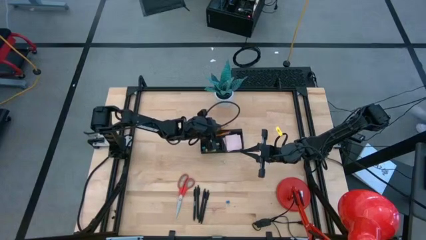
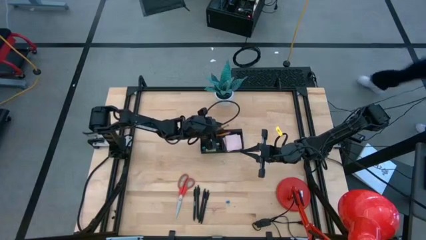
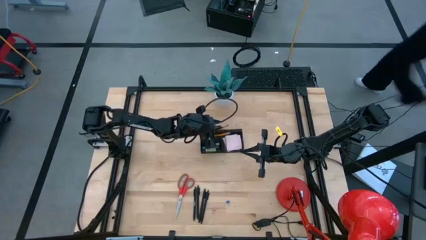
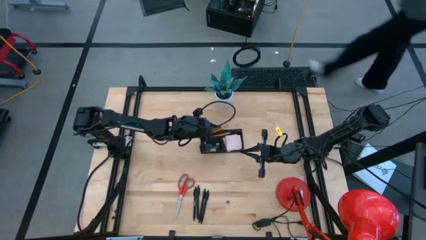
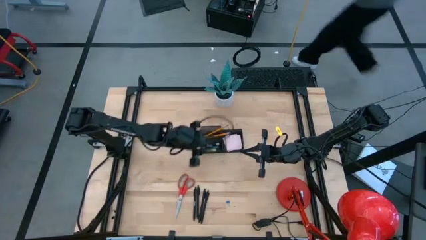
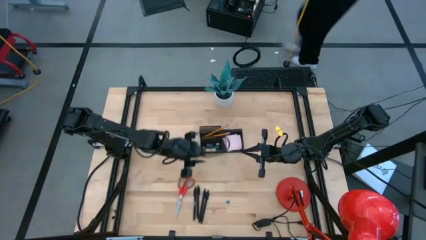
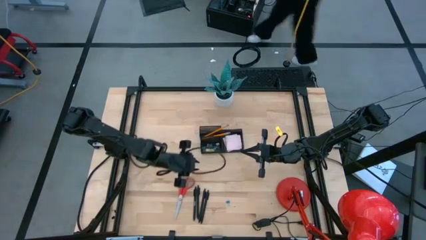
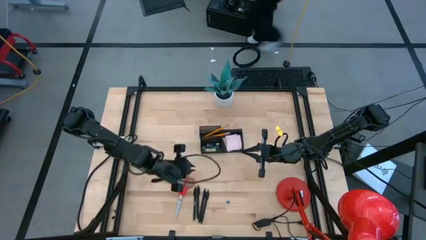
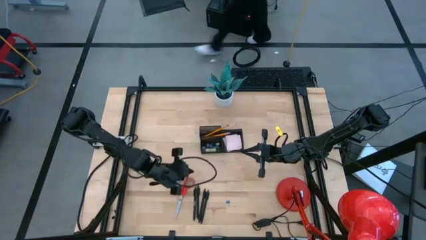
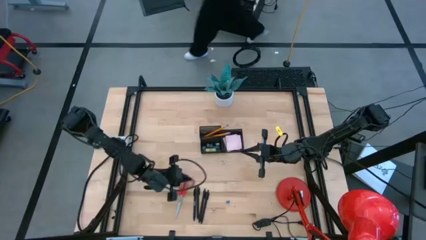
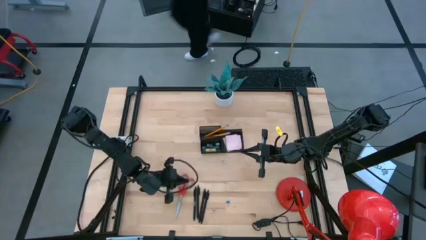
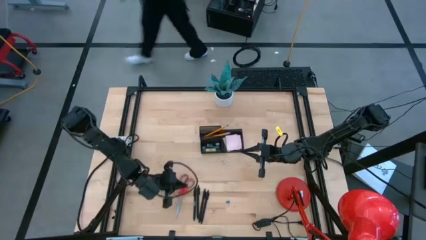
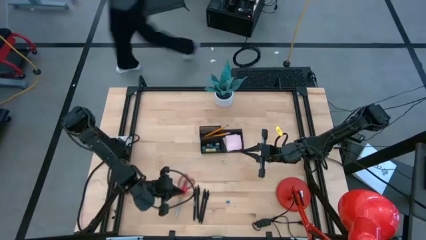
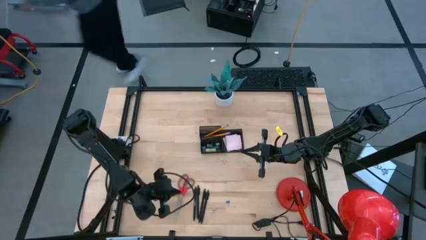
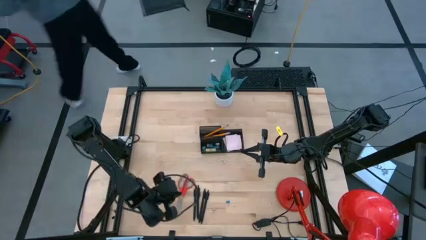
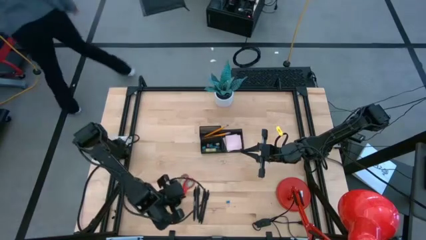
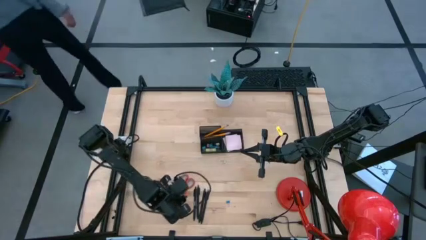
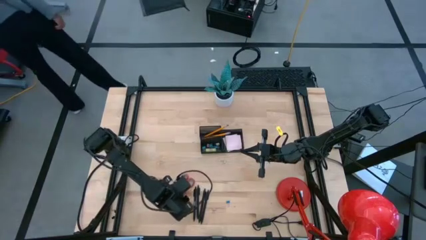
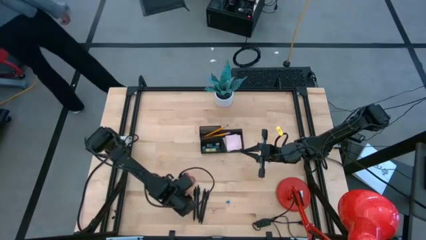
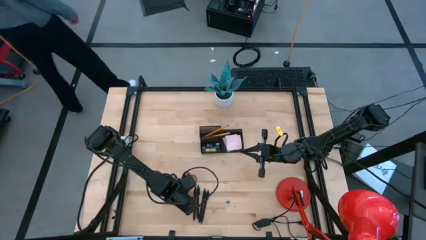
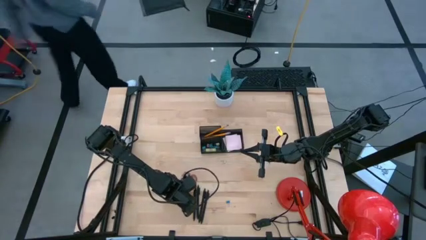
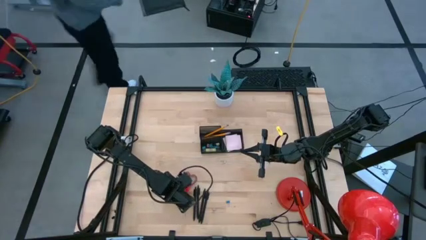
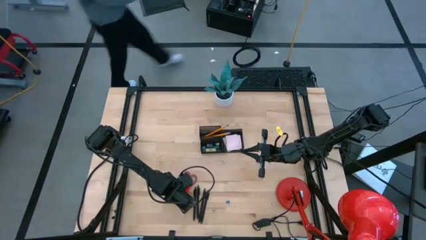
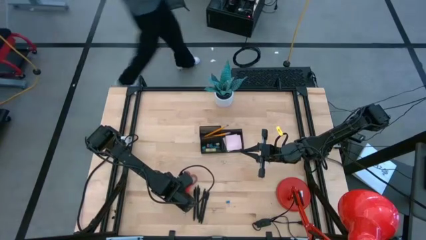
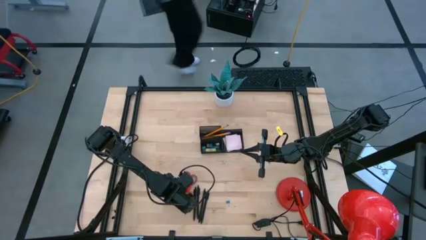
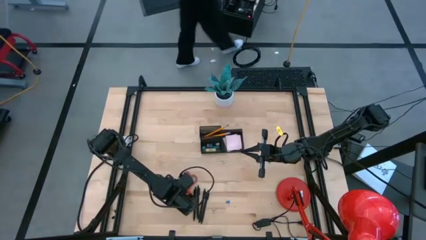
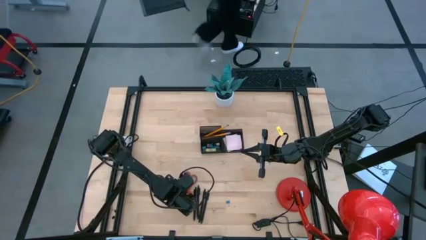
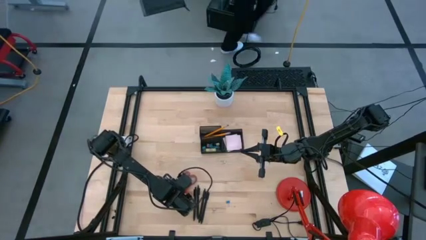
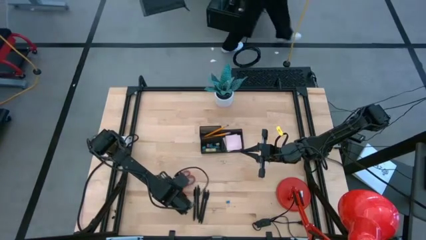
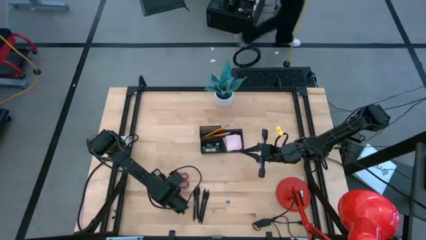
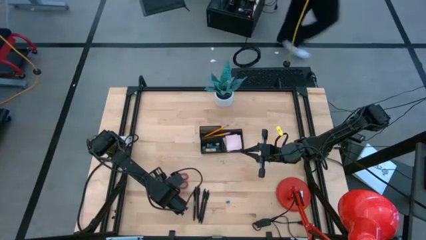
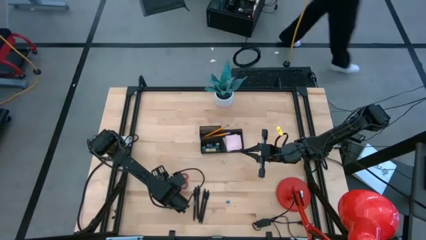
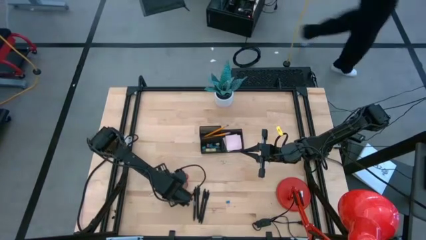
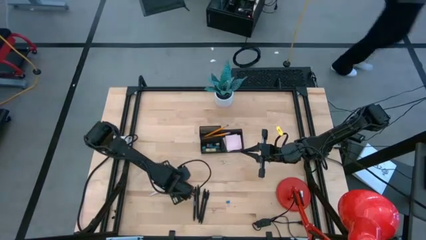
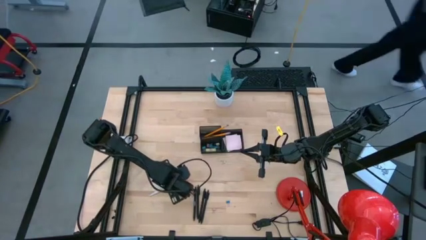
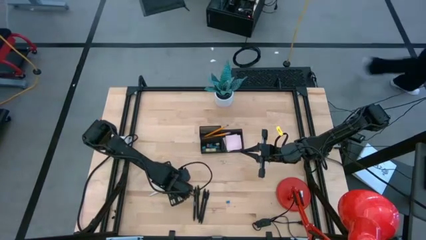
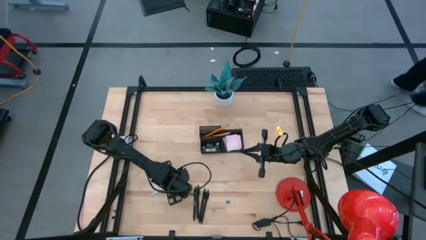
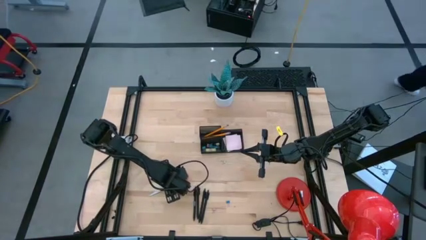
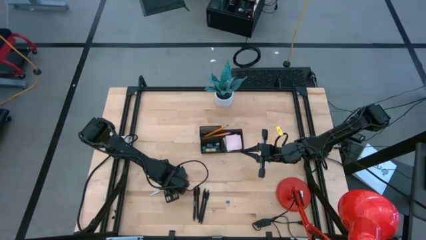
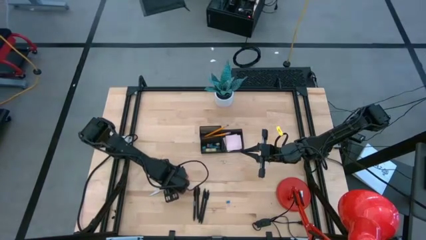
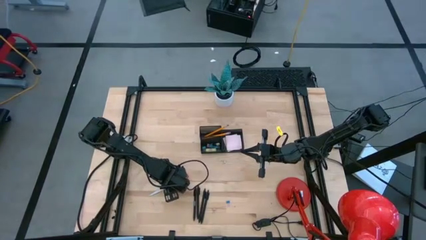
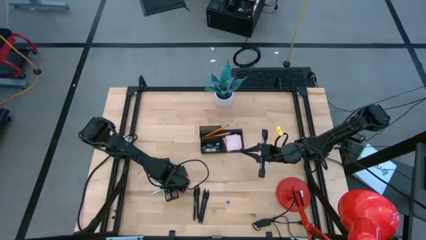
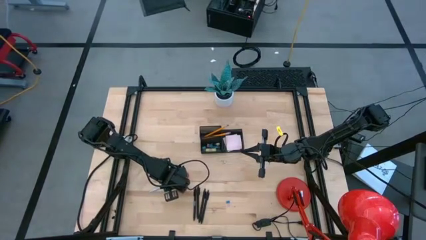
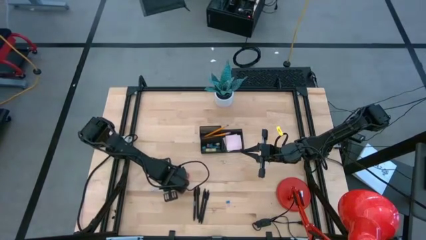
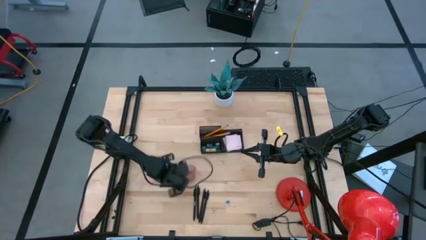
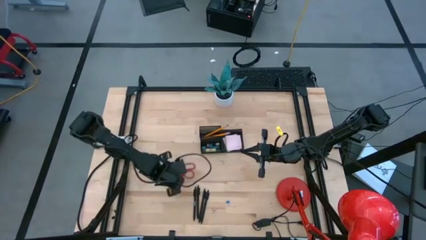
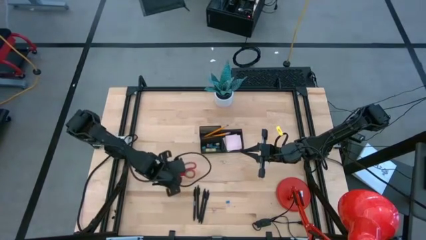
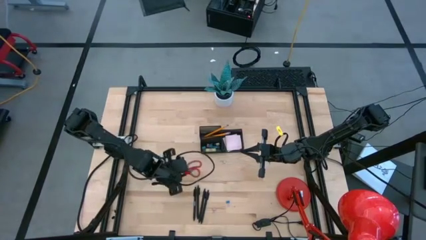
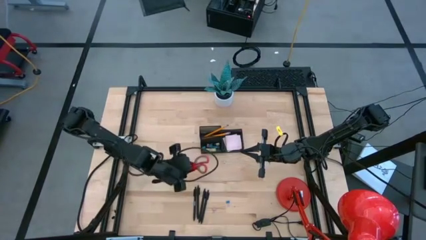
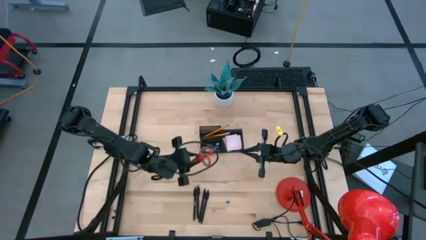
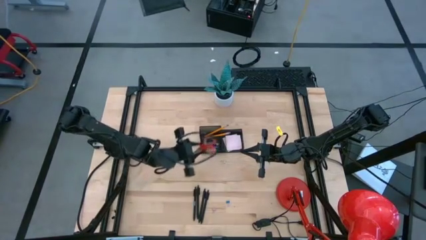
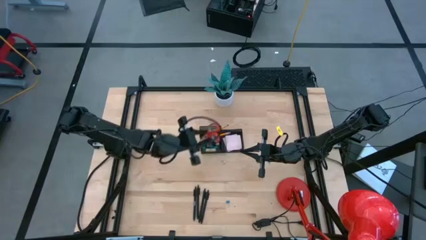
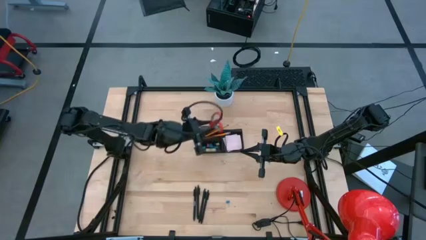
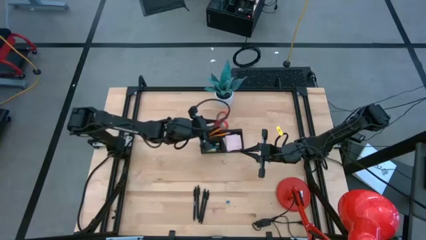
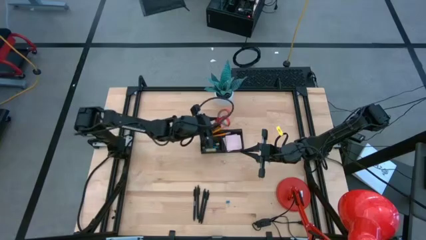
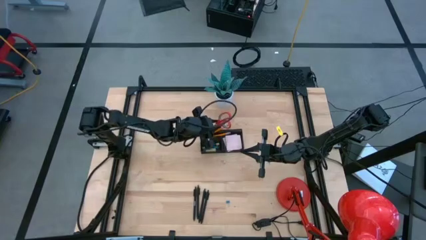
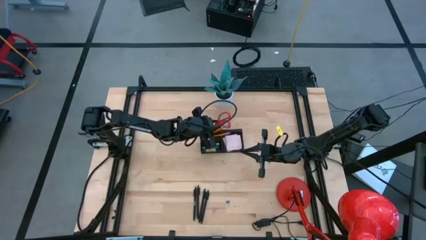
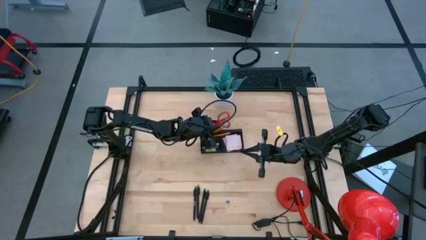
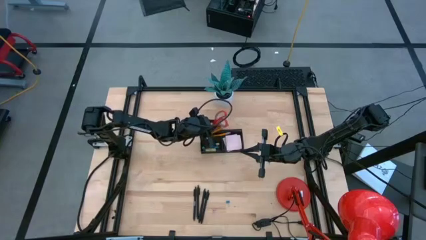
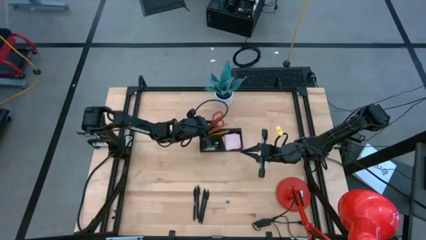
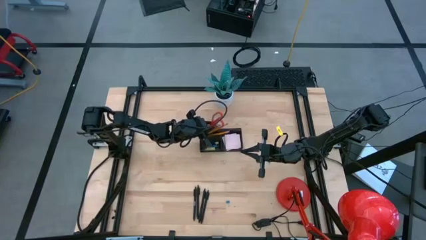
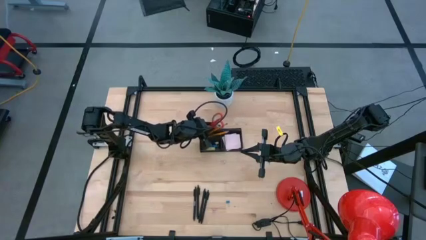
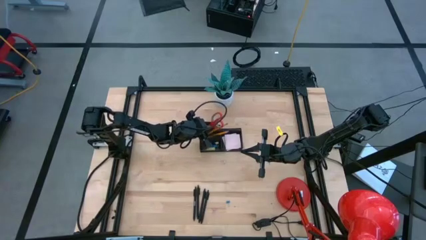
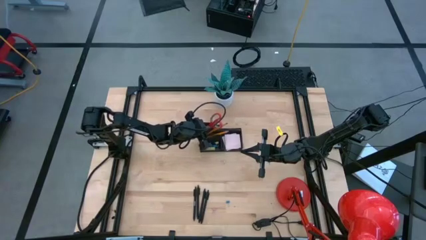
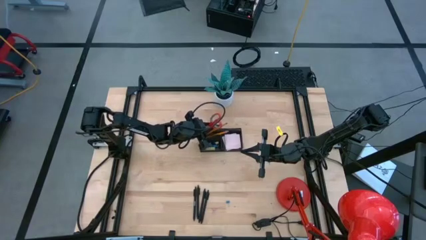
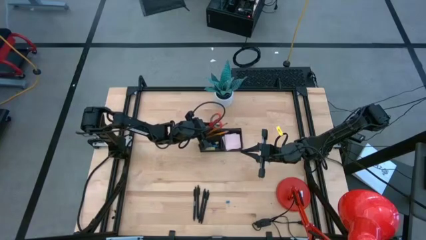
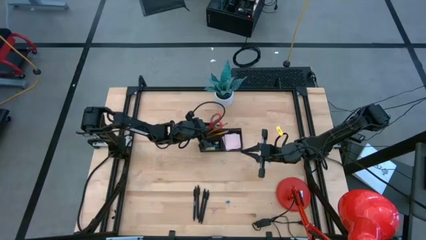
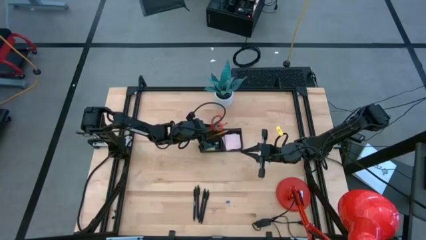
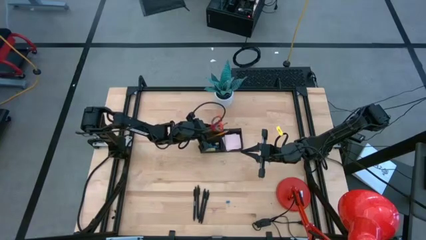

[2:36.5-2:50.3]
Task: Pick and place office supplies into organizer
Put the red scissors into the black desk organizer

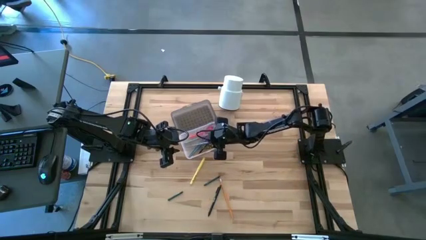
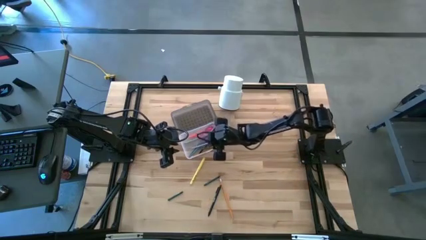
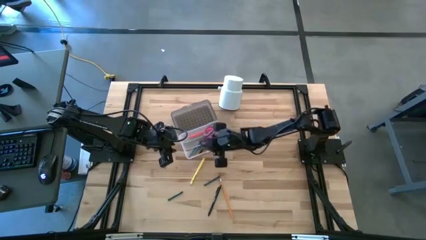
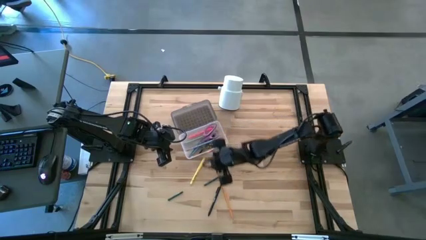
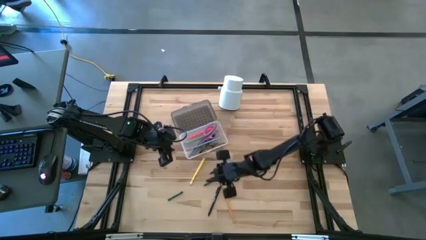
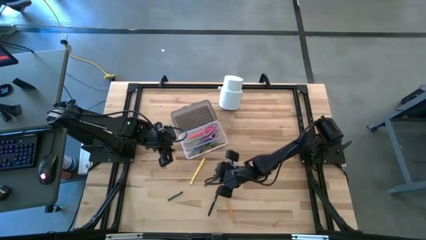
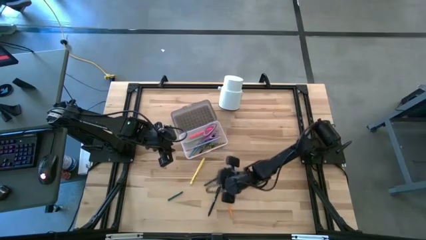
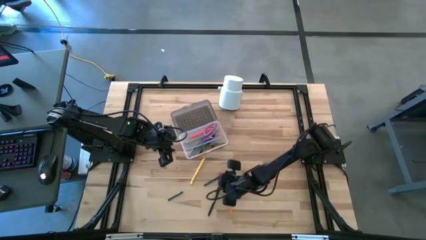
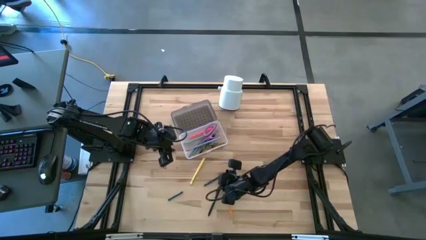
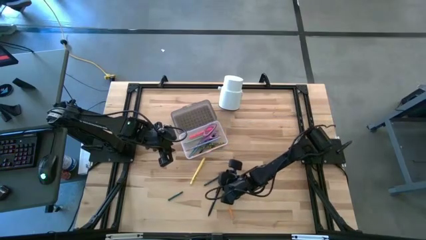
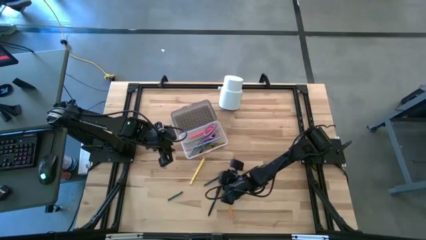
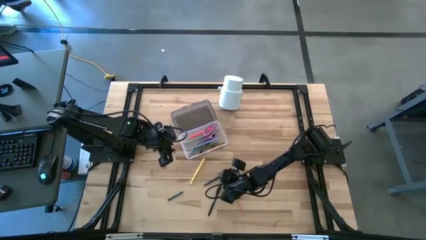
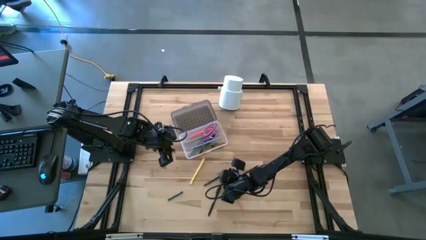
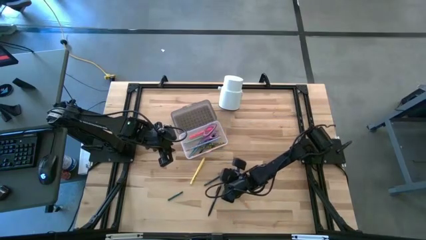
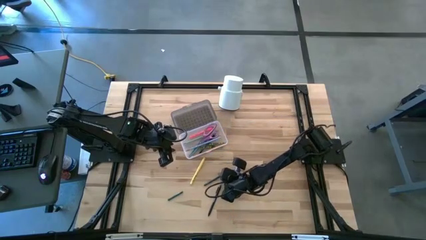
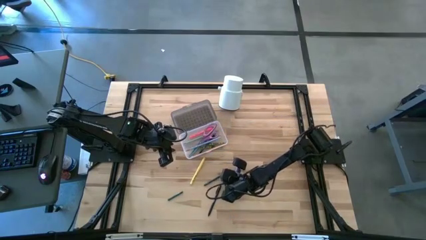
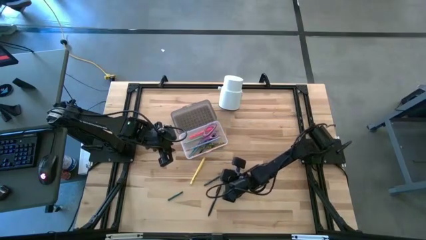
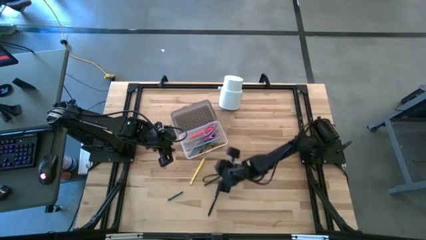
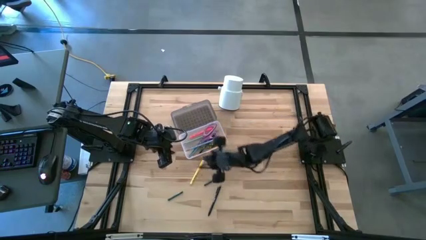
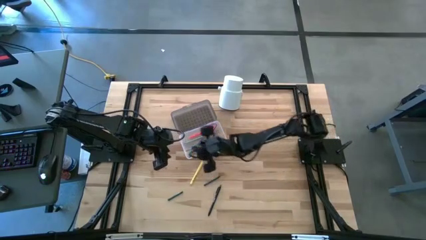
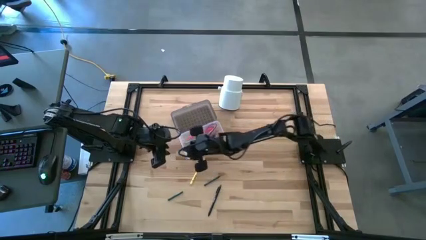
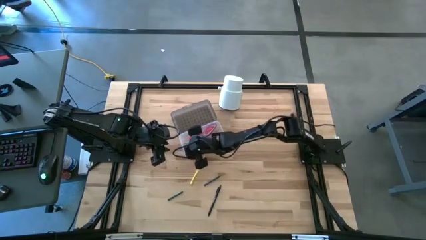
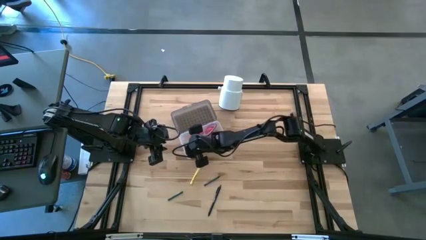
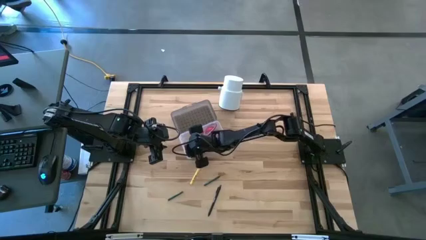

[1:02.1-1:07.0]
Task: Pick & place school supplies into a supply box
Put the yellow pencil into the black supply box
